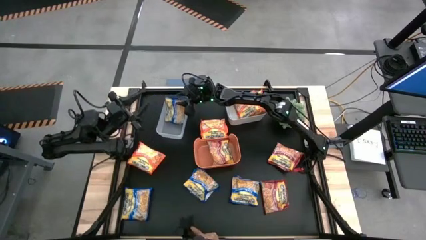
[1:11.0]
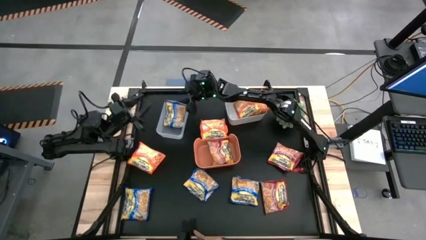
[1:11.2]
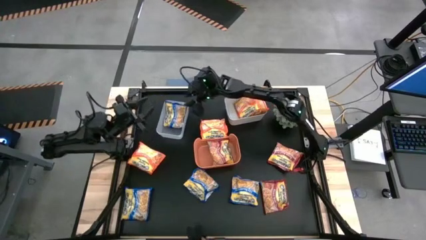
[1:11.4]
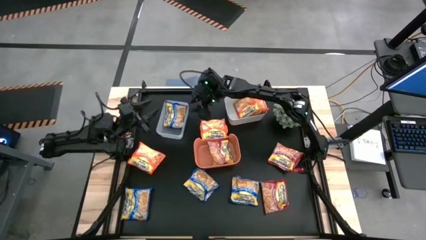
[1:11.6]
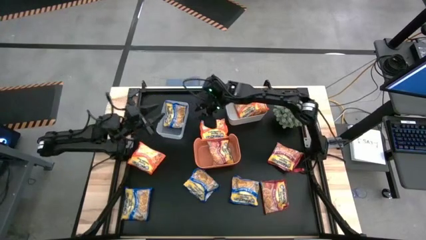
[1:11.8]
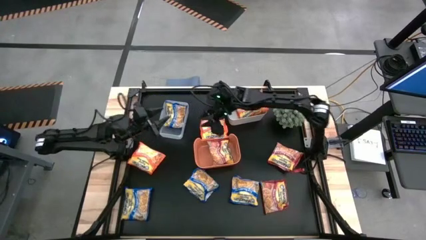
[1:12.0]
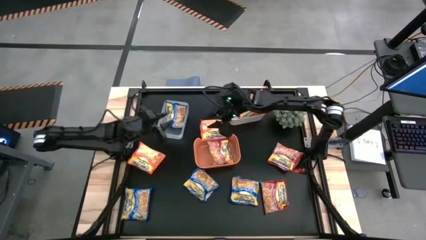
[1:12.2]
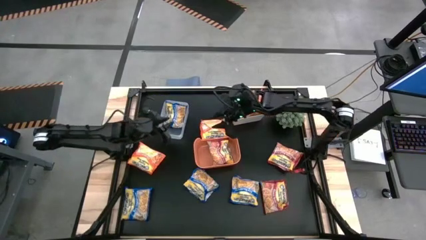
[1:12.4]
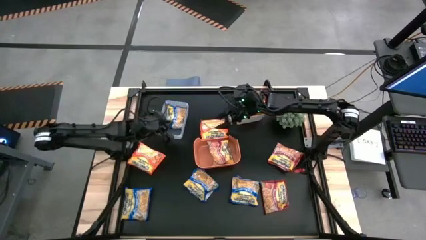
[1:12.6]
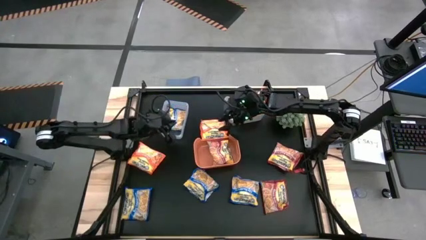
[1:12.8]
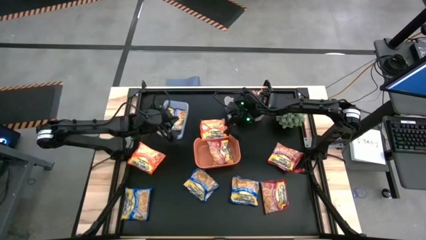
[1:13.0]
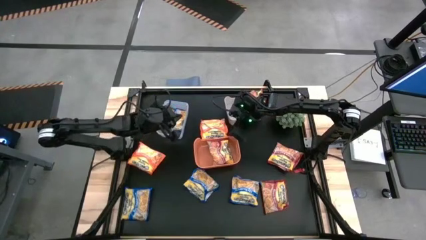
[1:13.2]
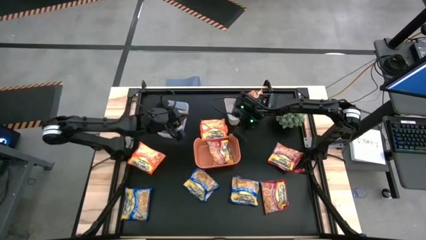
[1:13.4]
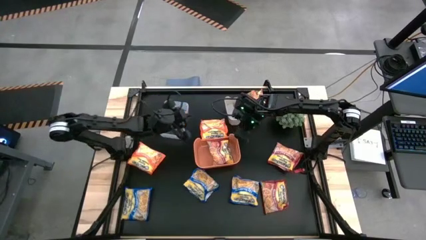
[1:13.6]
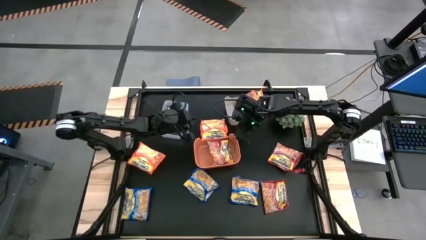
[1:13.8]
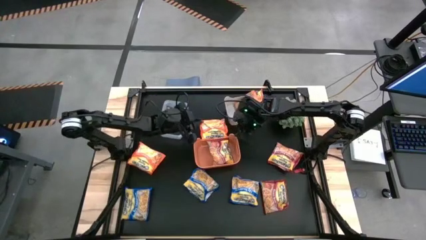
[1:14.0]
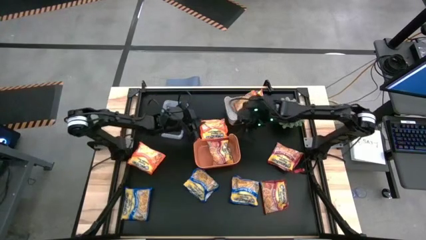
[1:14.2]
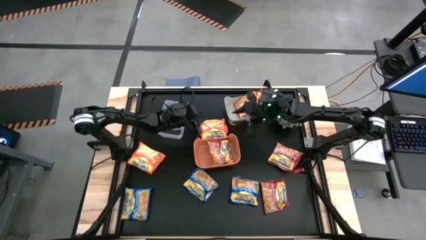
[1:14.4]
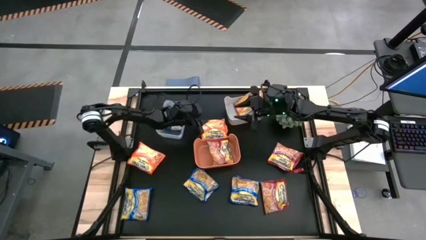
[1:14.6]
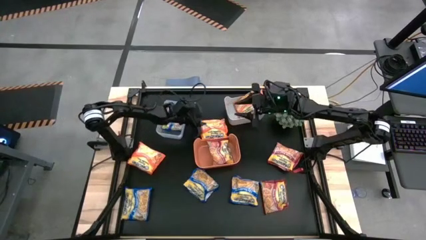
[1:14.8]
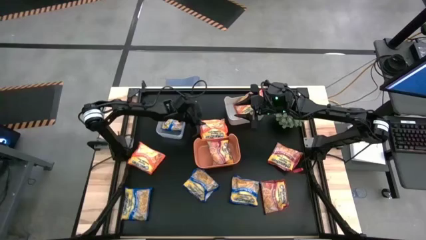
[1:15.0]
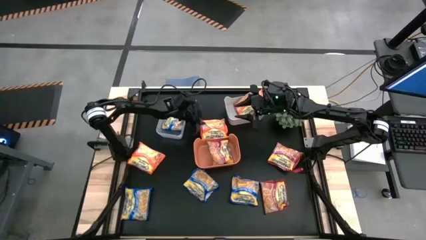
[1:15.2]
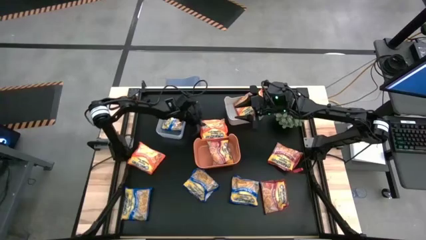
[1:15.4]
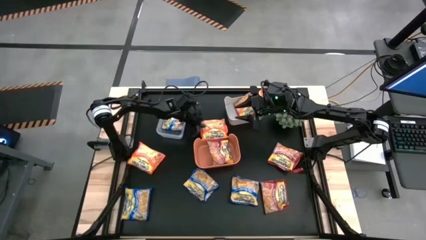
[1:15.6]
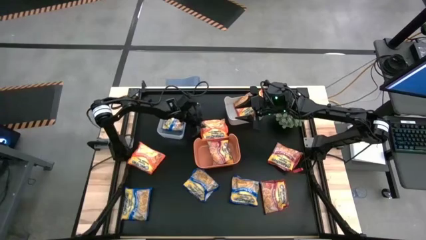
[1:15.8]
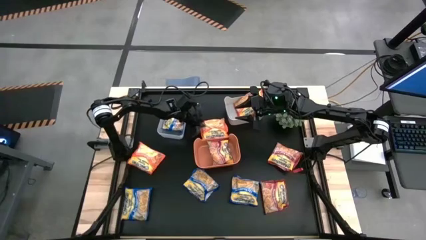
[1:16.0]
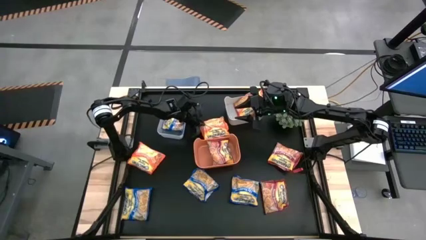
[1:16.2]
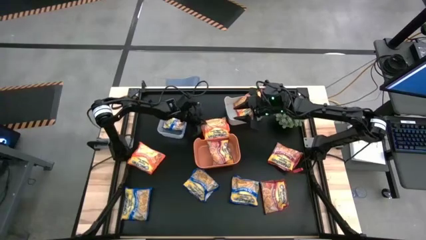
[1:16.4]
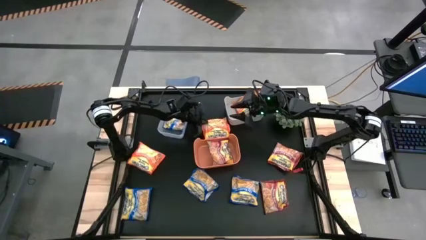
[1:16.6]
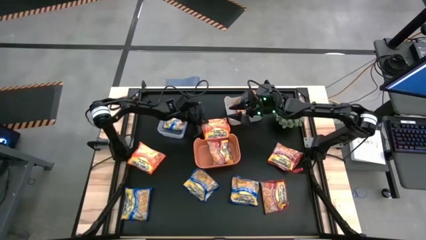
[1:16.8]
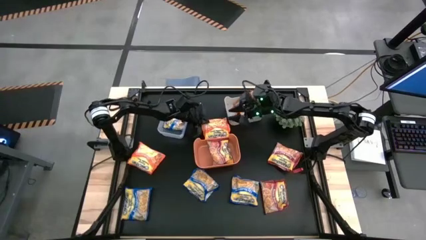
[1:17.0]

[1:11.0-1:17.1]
Task: Sort Maruchan noodles
Put the top orange noodle packet into the white bin

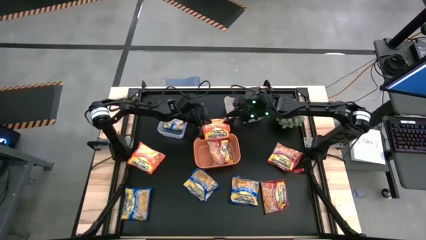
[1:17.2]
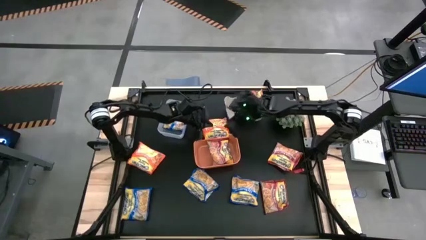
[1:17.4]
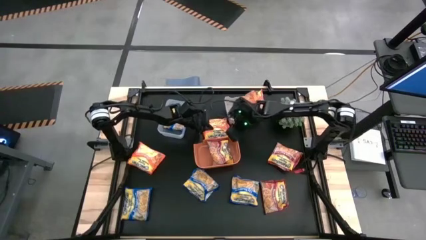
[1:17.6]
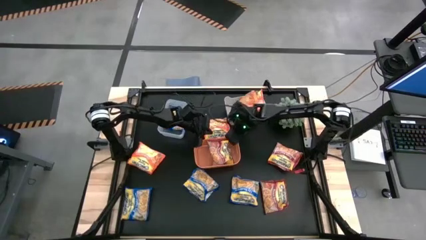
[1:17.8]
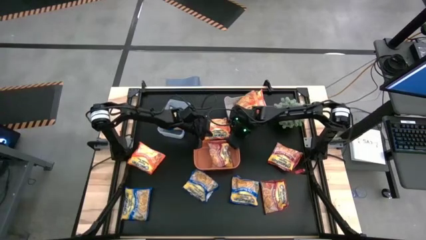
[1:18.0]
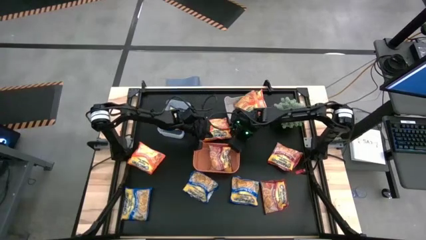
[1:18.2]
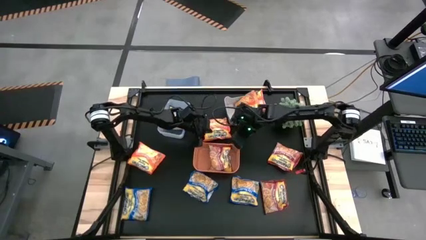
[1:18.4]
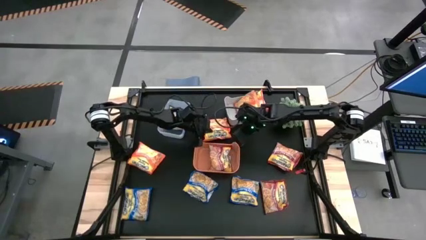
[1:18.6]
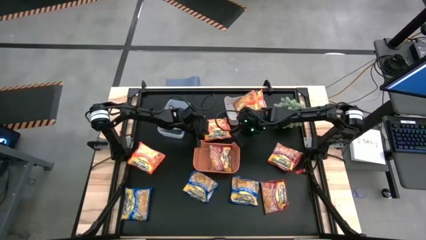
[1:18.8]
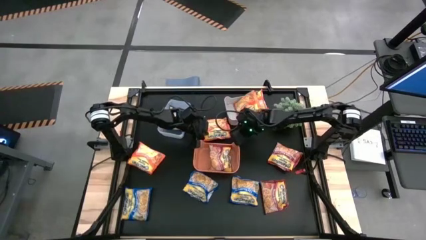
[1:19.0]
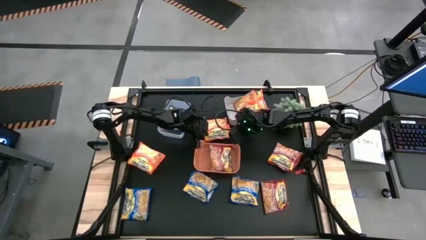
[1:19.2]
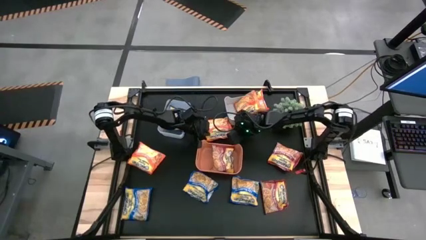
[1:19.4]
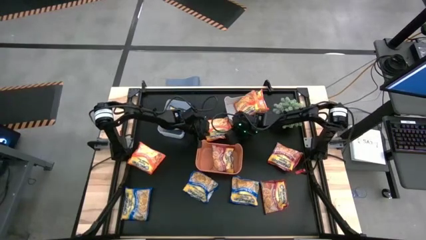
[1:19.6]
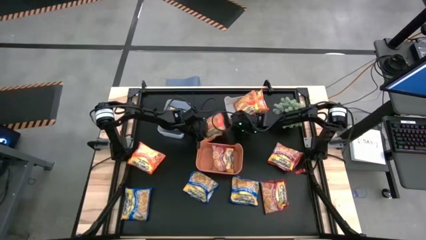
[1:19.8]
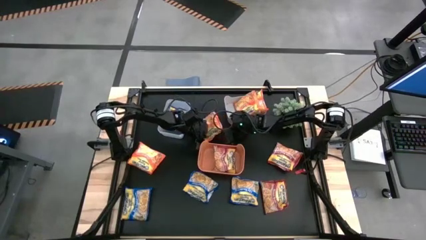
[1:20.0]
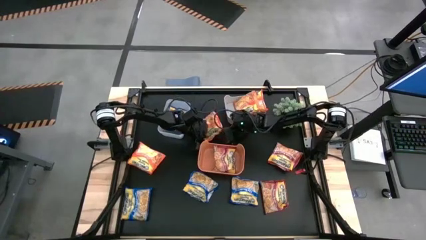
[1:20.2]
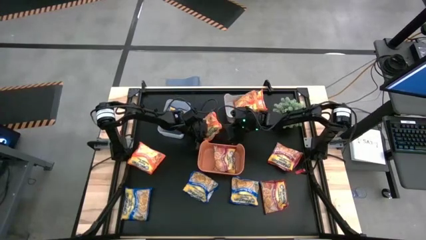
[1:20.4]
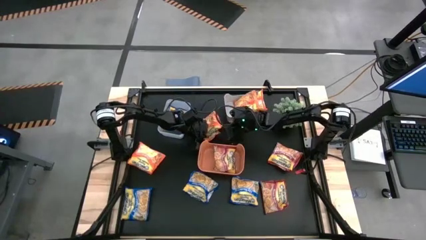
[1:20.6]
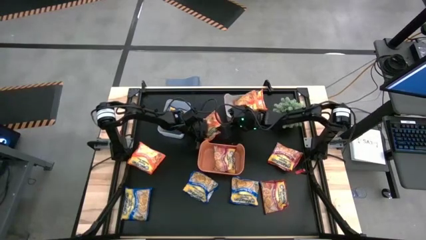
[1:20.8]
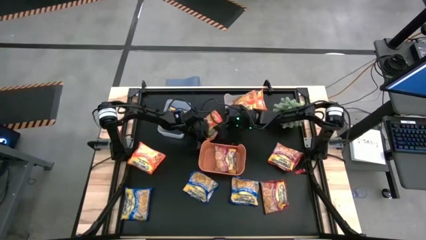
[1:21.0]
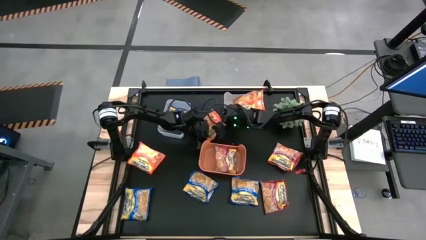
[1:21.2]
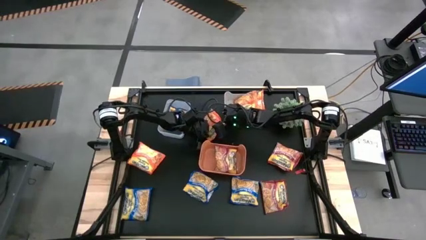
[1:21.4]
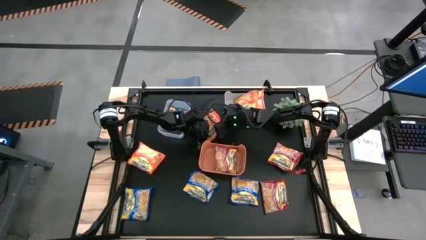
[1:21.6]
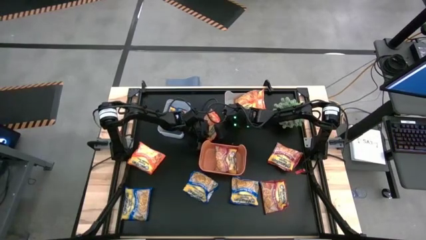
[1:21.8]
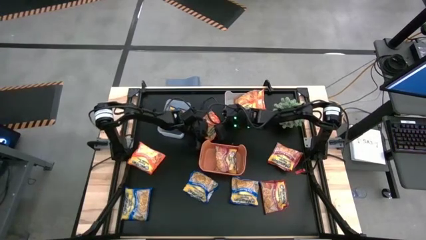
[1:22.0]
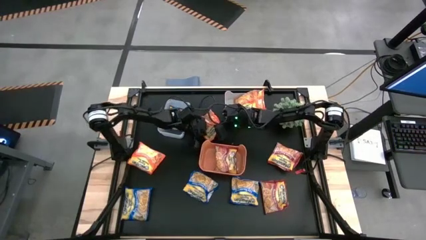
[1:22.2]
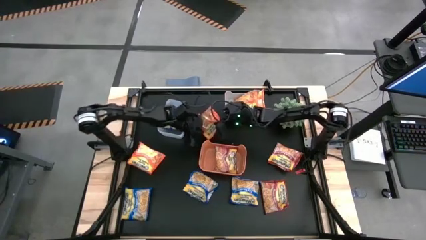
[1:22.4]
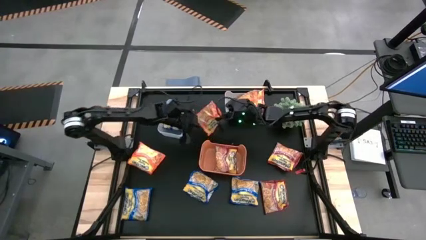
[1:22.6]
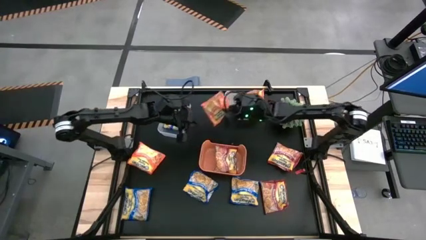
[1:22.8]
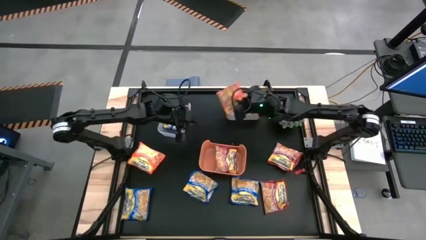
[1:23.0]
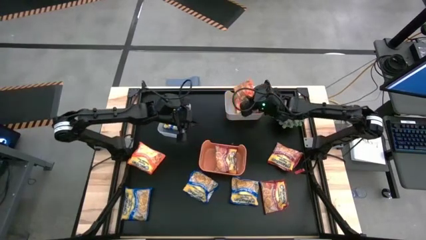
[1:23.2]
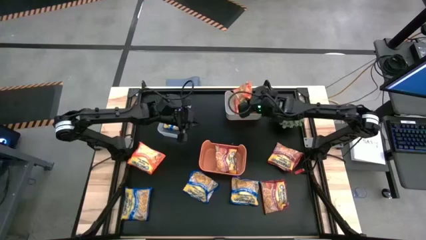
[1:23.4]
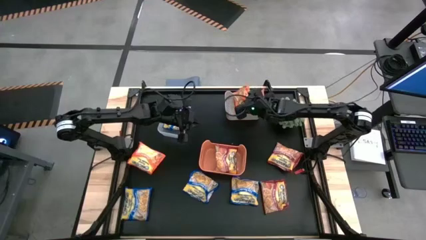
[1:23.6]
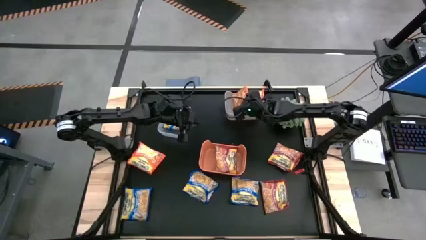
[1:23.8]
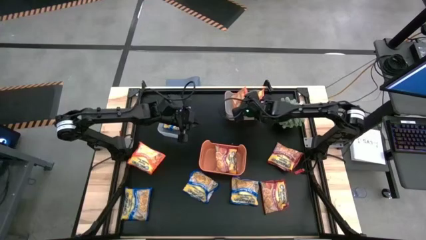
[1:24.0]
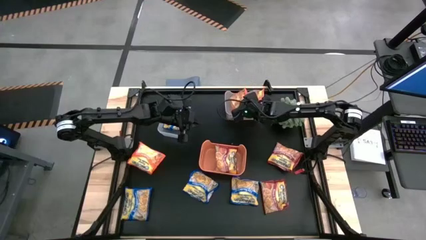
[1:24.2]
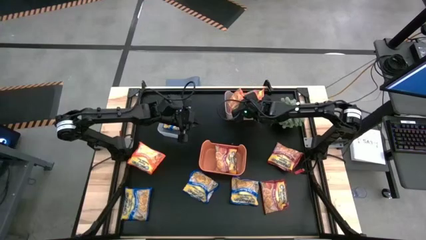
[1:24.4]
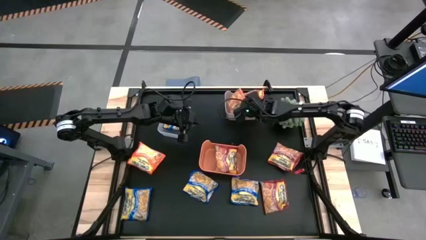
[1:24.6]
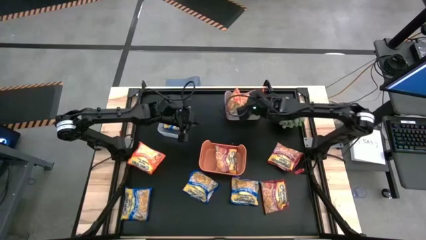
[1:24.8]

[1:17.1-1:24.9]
Put the top orange noodle packet into the white bin
